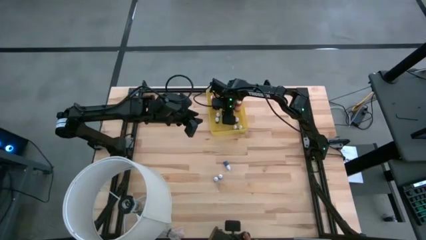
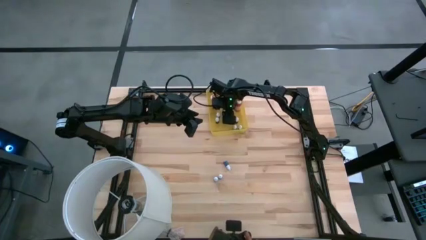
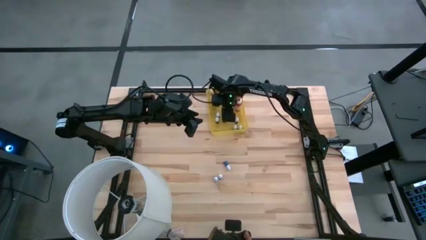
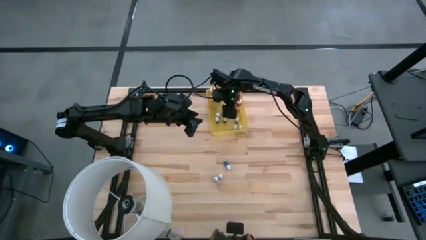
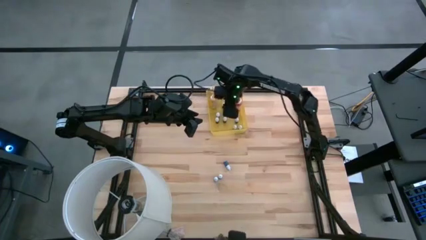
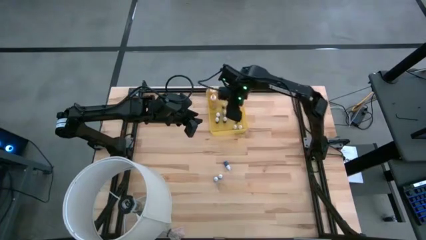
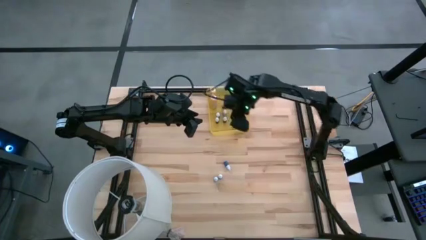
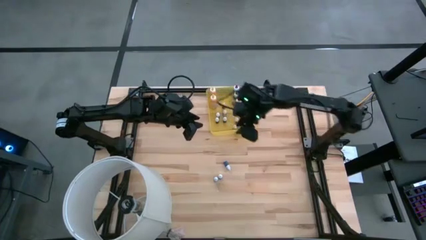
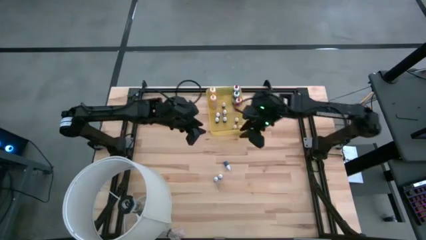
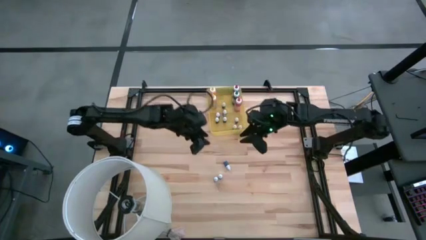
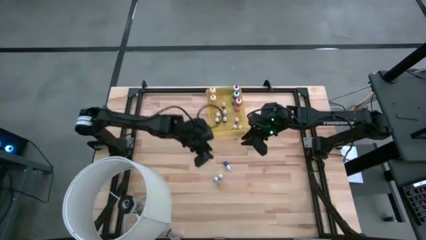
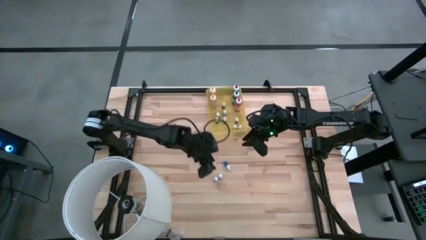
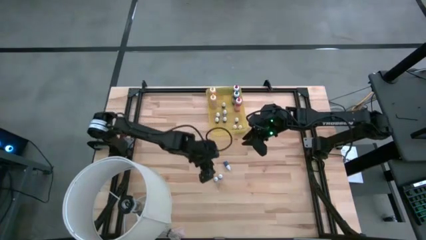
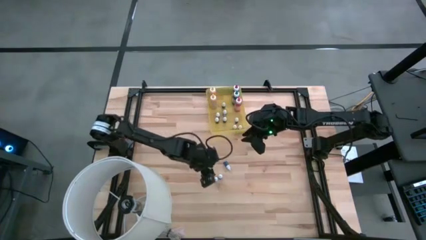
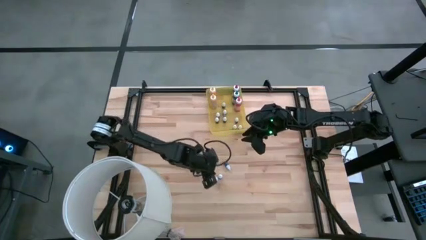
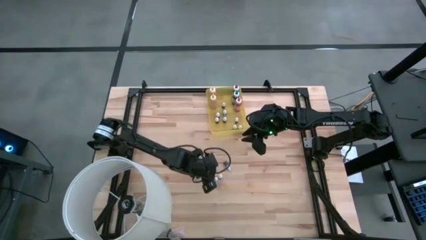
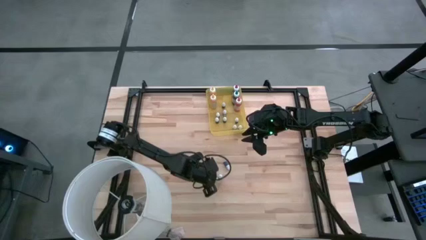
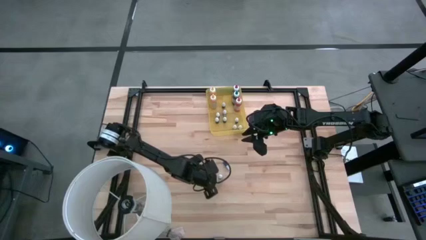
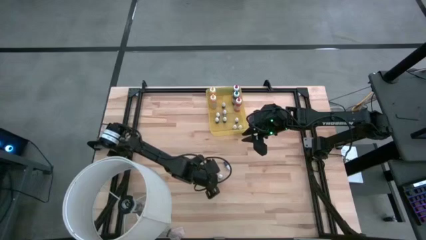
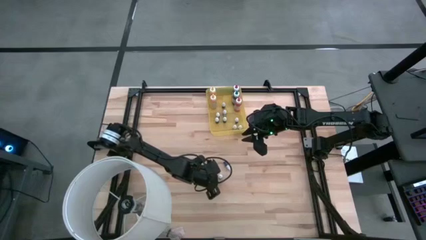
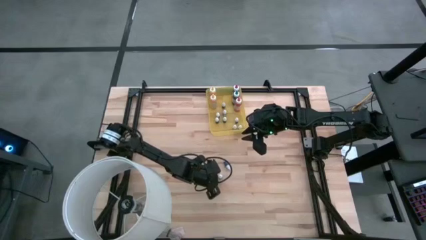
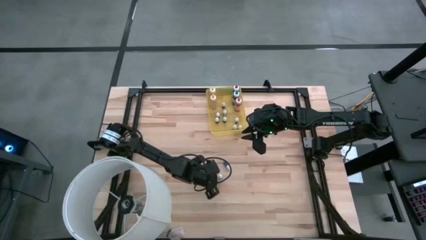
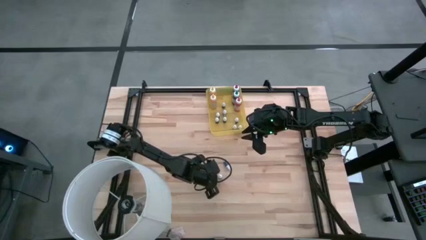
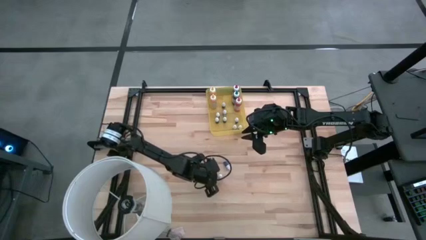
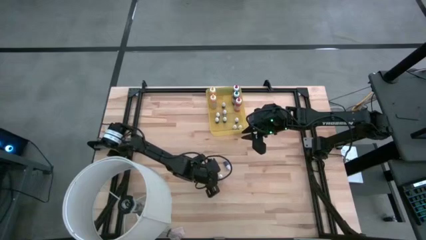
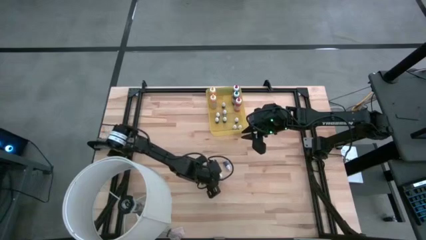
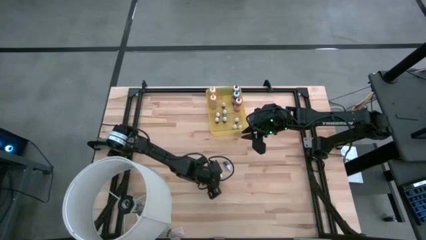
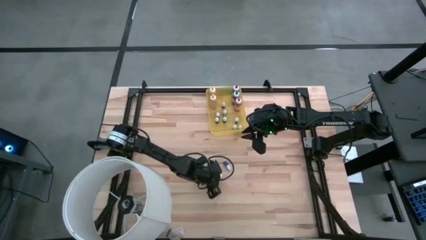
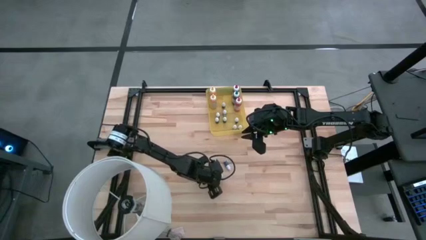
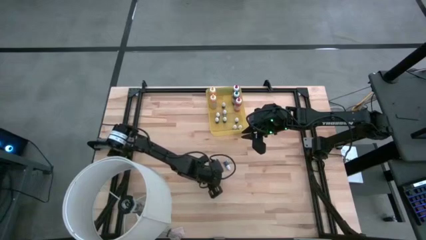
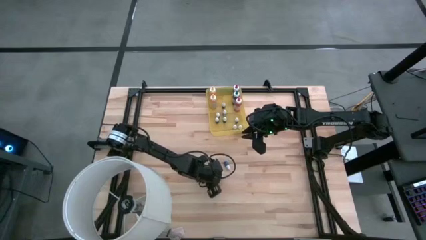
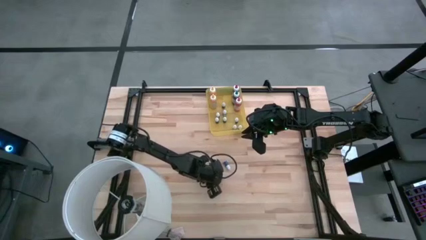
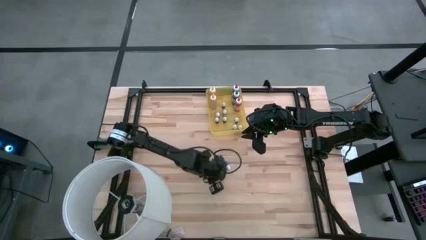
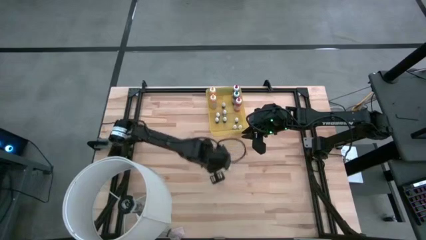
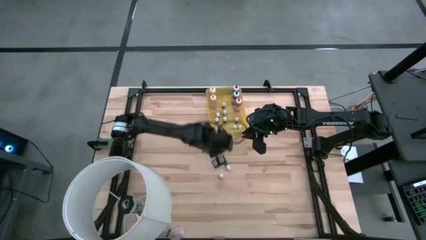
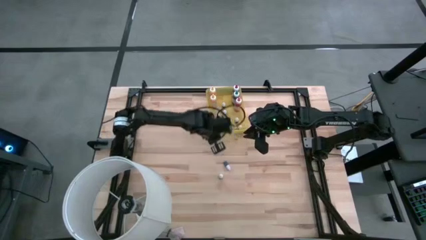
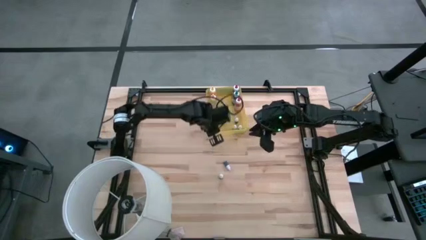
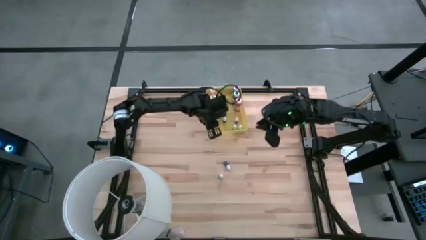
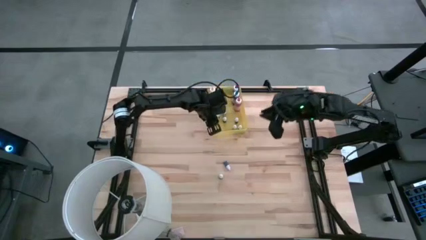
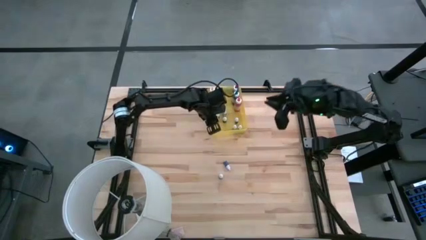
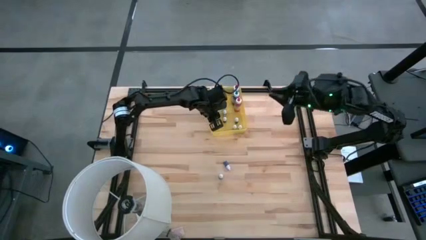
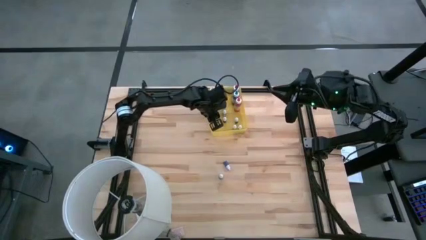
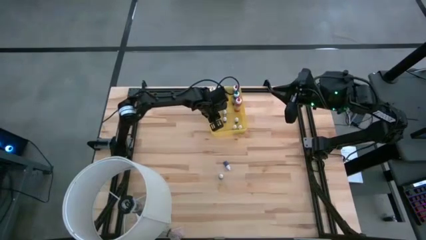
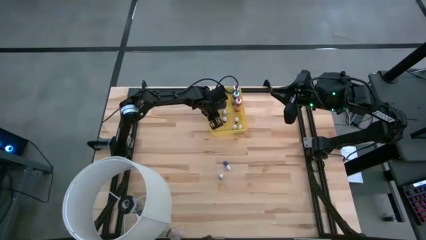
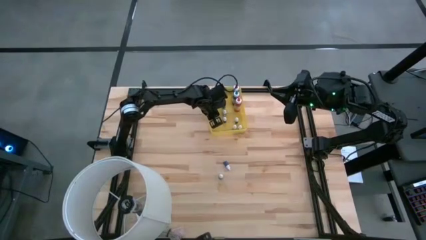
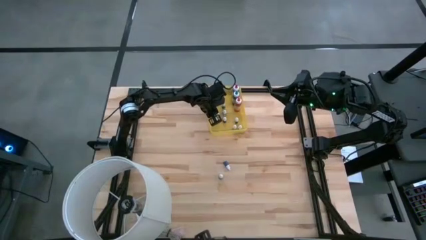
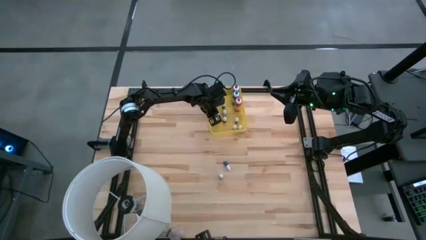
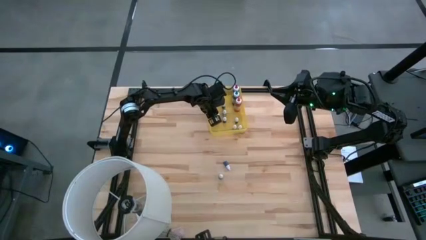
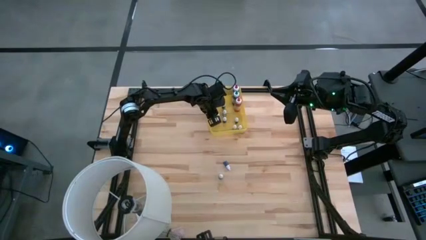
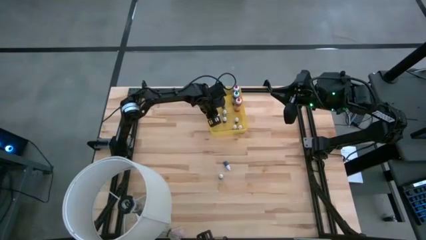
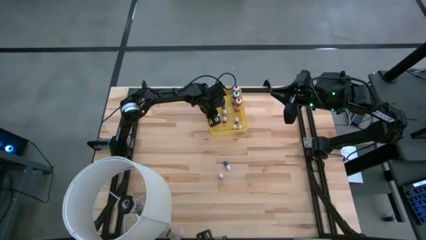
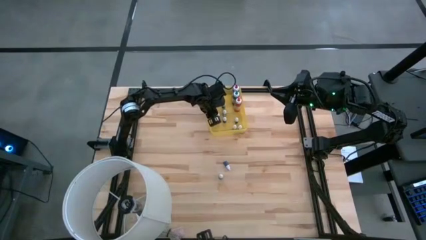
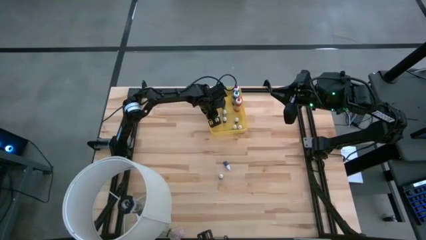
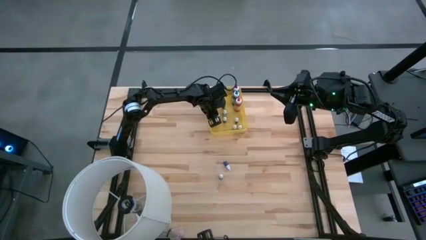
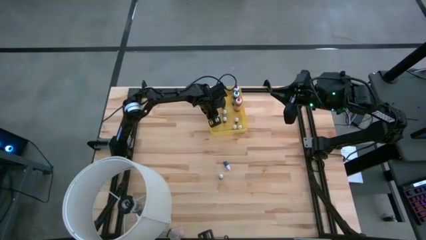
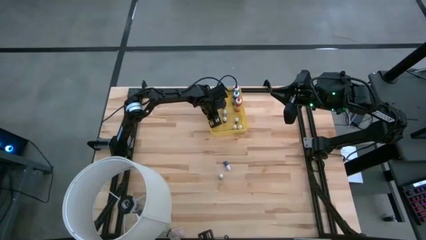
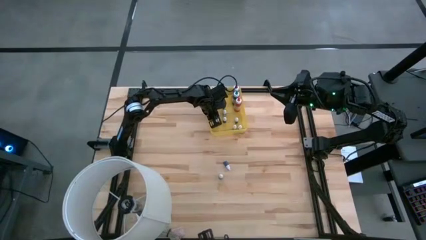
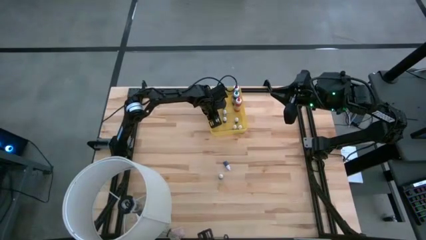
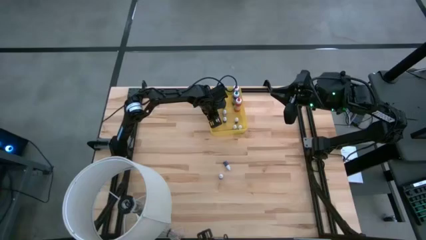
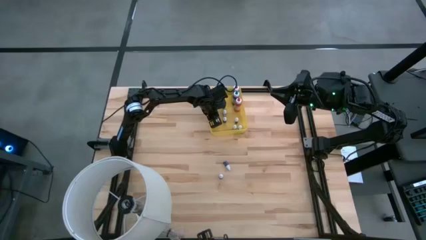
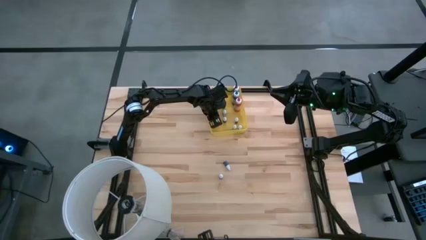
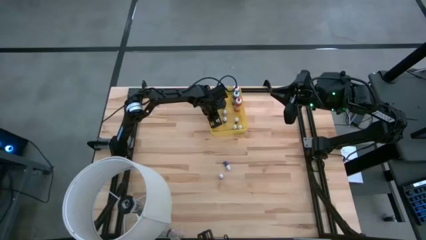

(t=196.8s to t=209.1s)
Task: Pick & Place food coloring
Put the small dark green food coloring bottle into the yellow bin
